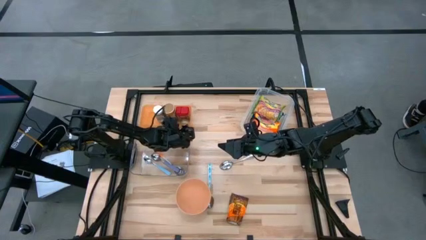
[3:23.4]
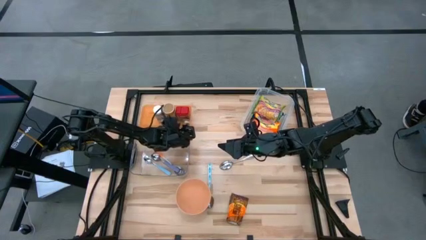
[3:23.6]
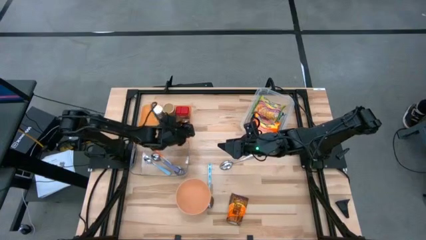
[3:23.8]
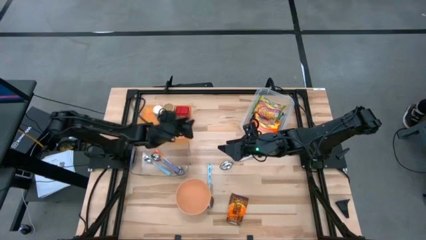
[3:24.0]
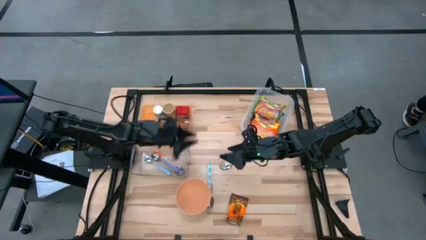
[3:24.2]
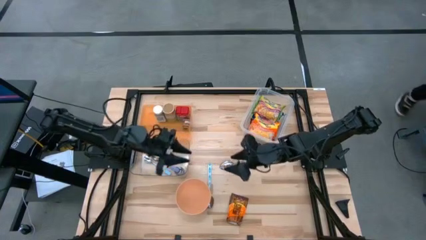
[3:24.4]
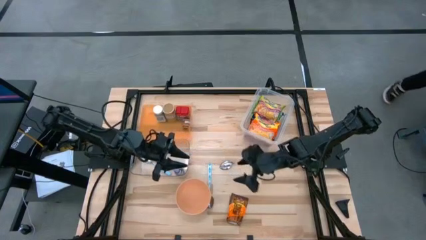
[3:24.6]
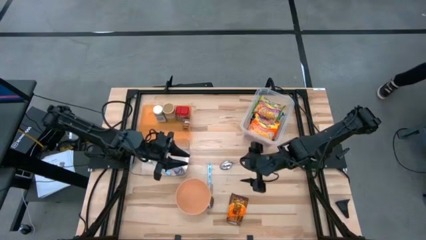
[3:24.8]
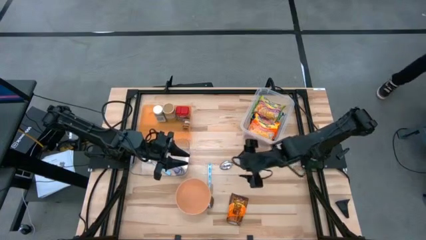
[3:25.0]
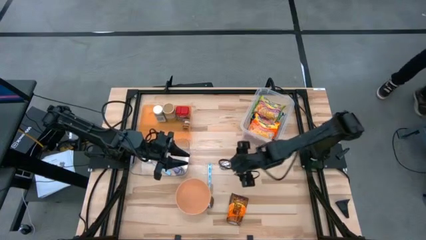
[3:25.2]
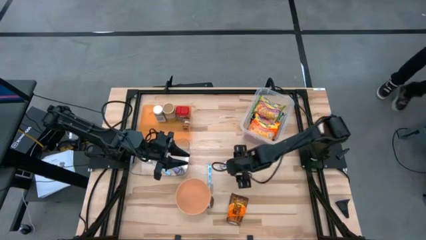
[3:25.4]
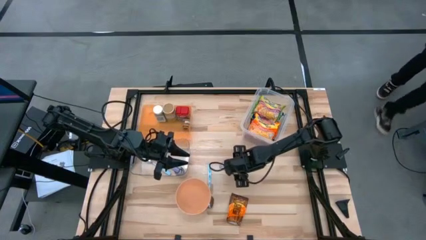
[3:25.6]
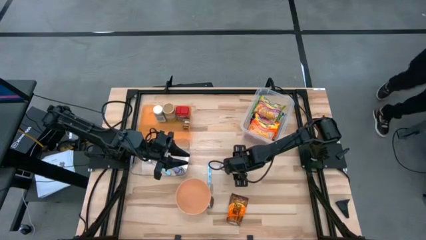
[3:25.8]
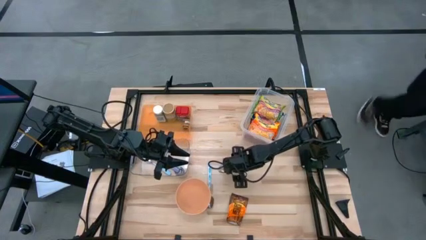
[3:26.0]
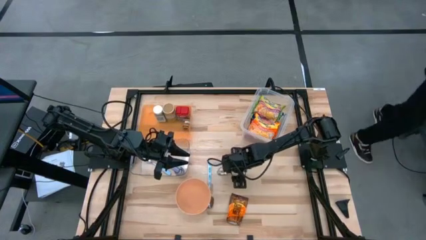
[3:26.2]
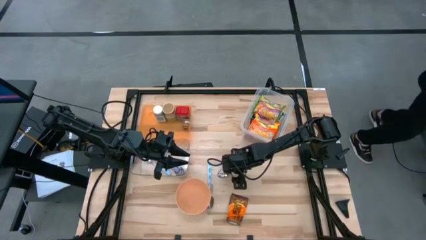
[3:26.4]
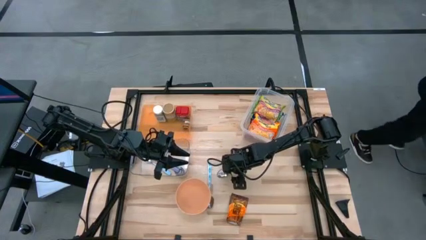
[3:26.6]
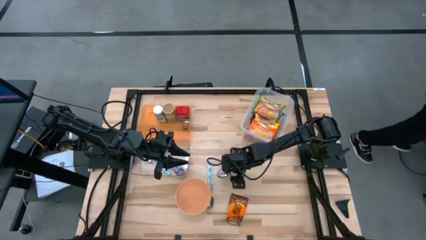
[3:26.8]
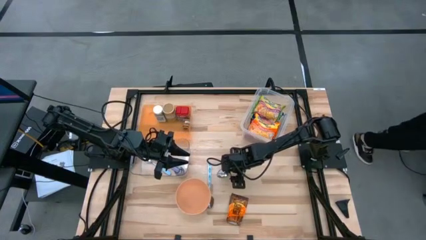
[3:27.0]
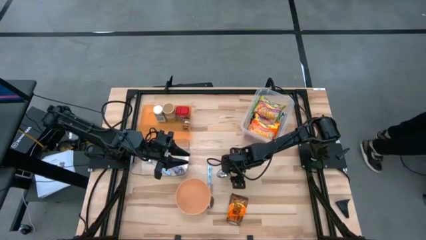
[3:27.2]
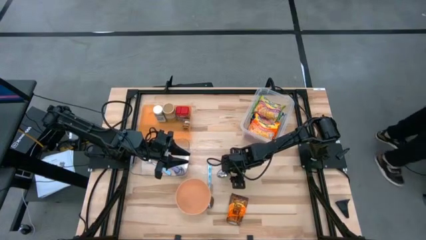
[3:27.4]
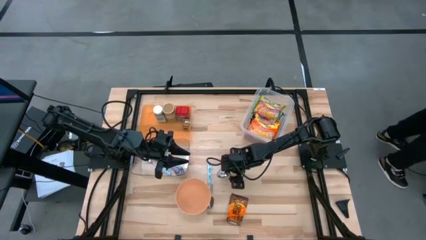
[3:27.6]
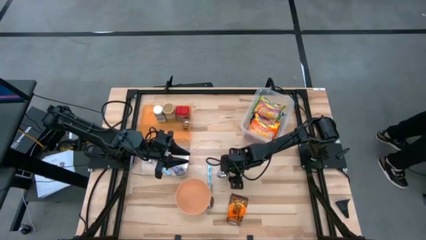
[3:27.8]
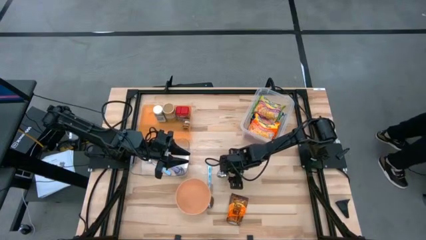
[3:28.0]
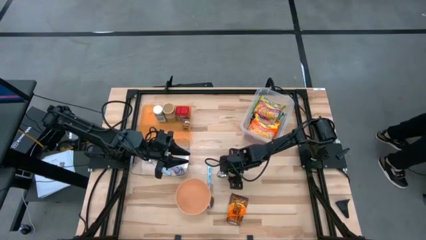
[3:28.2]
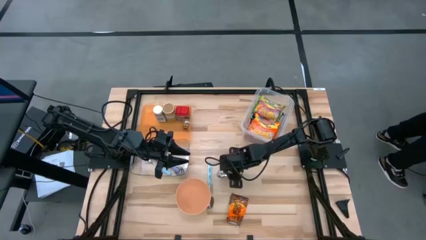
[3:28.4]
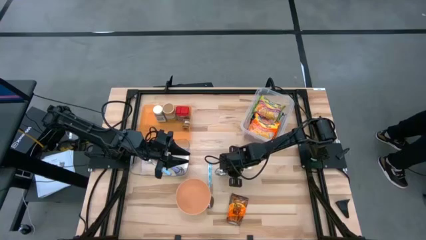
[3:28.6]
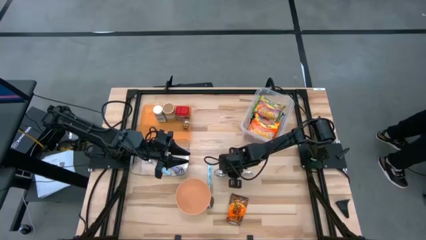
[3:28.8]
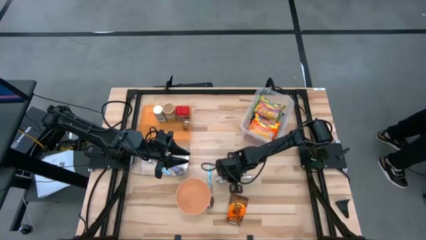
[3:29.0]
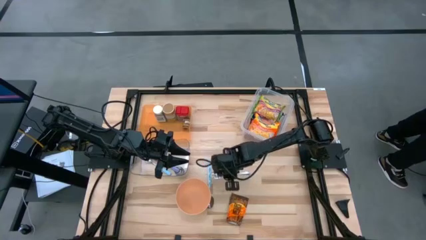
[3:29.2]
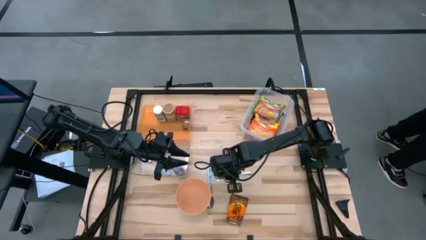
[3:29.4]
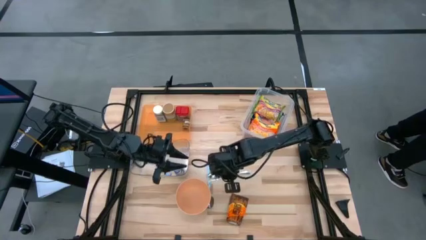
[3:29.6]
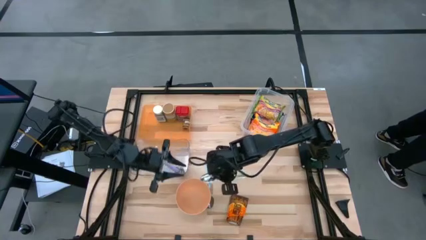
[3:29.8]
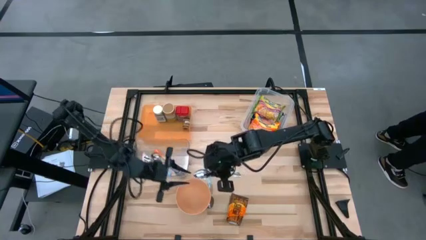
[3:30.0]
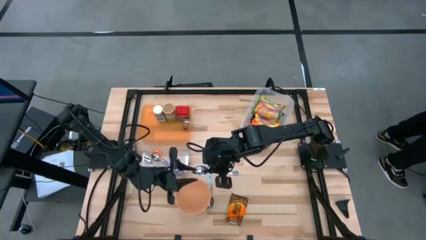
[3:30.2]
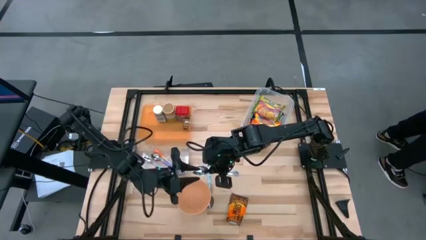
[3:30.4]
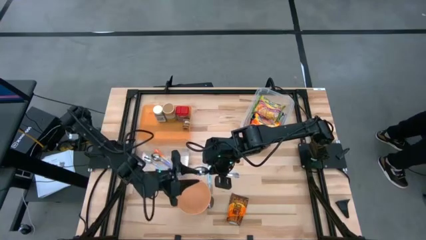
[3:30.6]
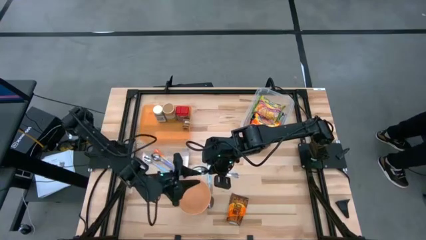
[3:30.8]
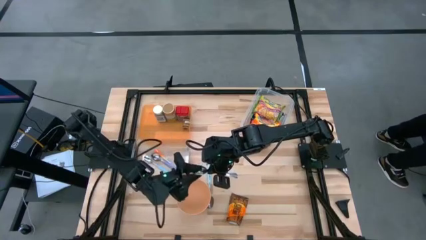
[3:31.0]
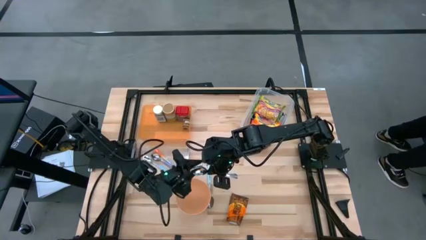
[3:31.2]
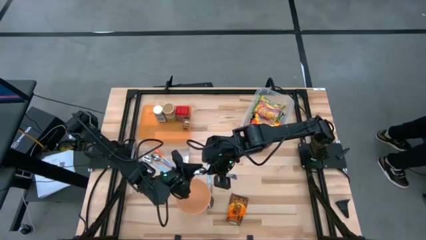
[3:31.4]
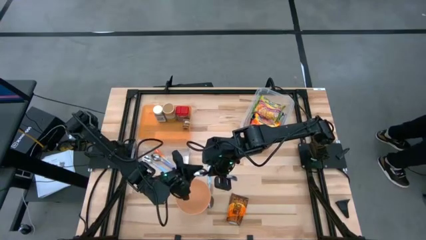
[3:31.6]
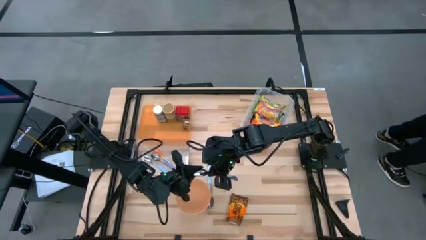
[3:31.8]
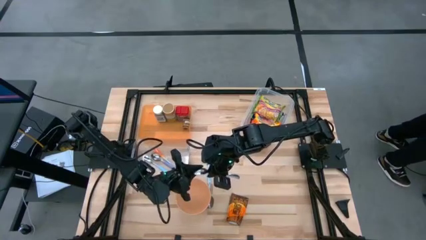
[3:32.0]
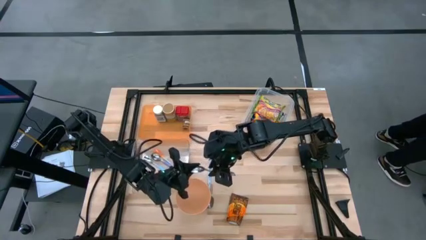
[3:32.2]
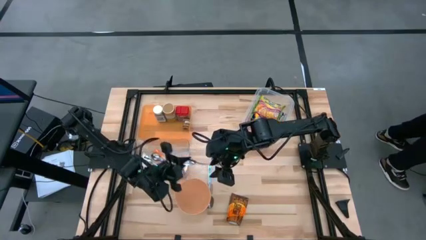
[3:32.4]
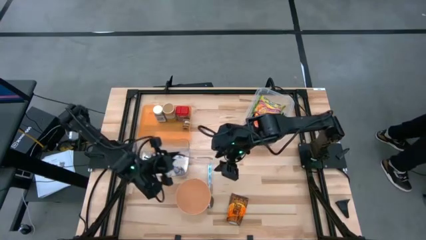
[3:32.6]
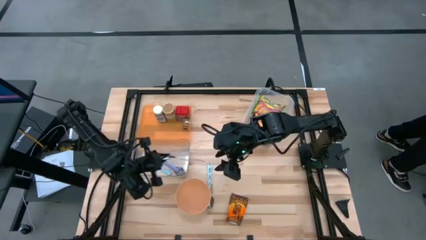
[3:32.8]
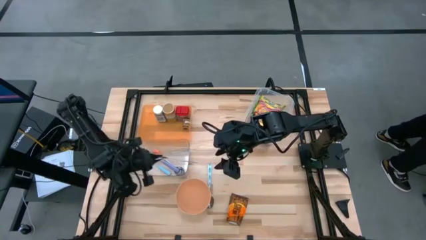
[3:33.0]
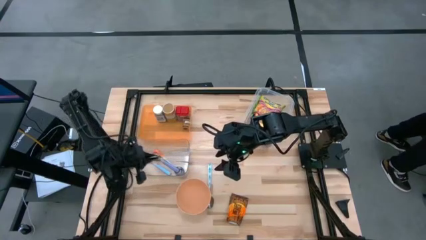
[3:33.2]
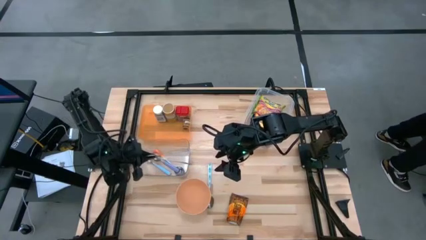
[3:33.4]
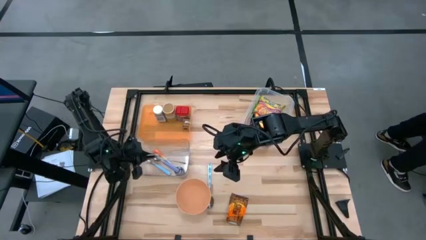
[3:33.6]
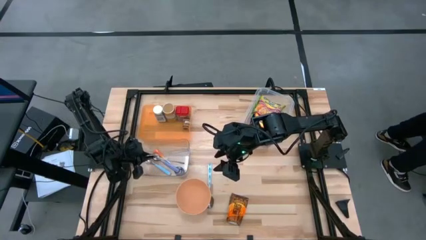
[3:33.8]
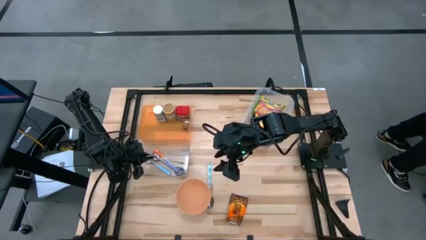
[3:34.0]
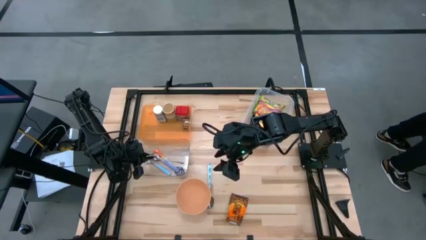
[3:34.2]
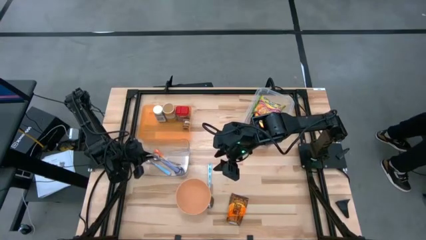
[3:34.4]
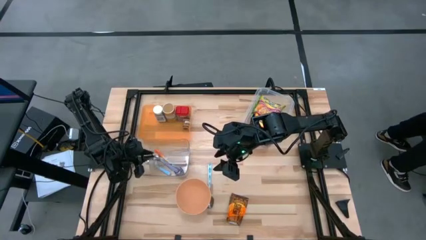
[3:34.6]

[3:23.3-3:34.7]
Task: Pick & Place Food Item
Put the silver spoon into the bottom transparent bin

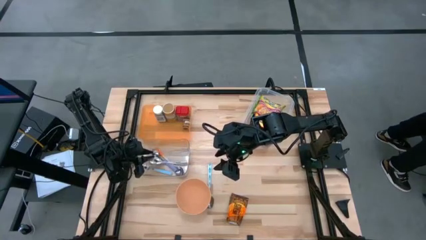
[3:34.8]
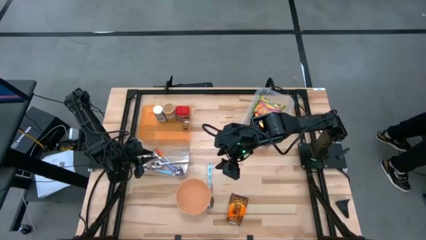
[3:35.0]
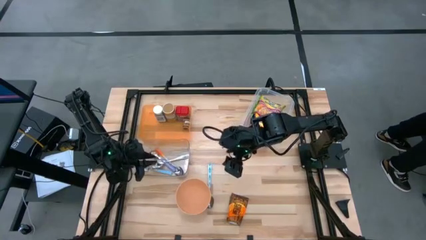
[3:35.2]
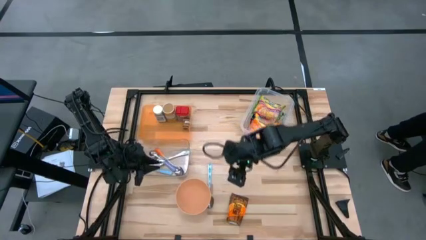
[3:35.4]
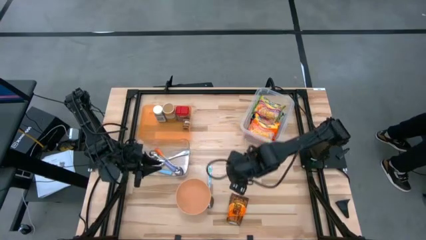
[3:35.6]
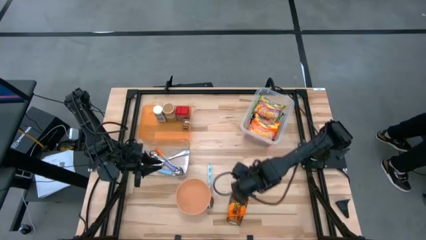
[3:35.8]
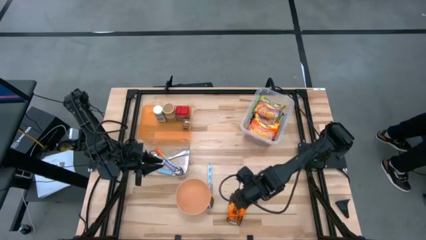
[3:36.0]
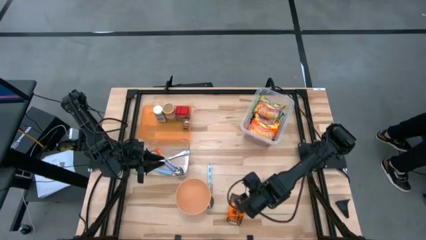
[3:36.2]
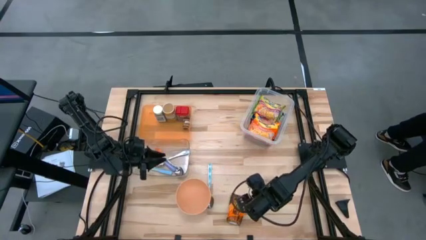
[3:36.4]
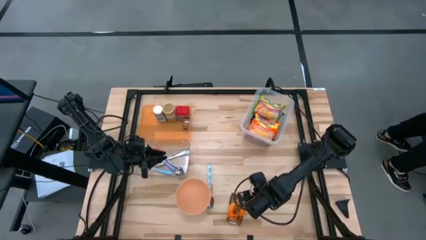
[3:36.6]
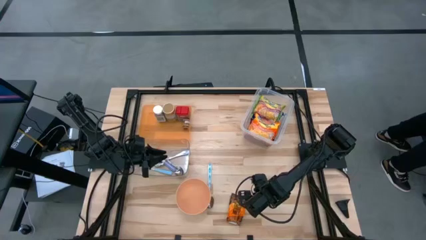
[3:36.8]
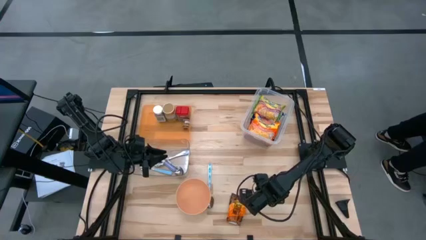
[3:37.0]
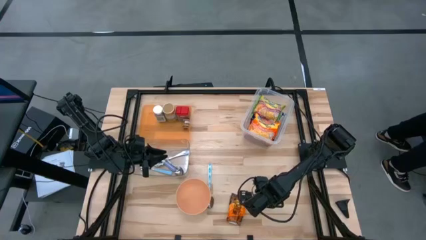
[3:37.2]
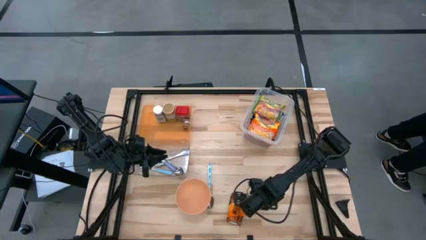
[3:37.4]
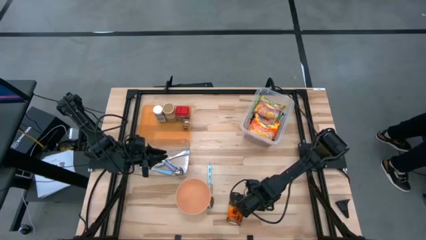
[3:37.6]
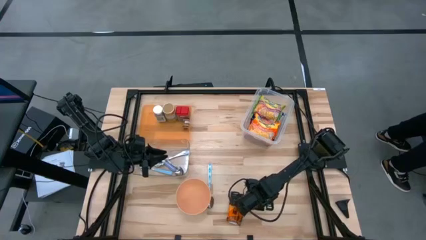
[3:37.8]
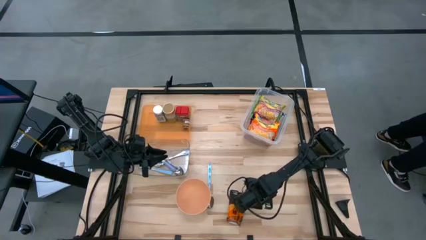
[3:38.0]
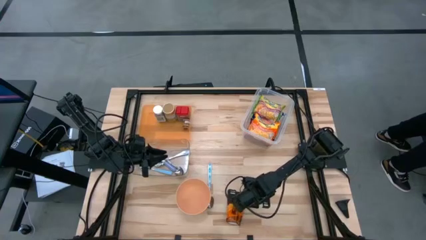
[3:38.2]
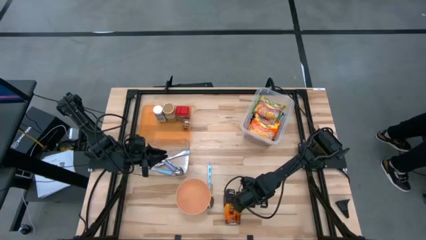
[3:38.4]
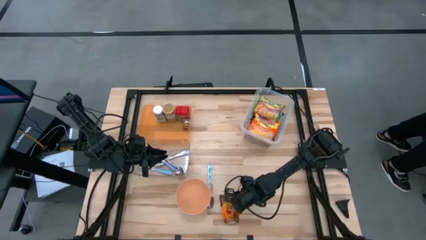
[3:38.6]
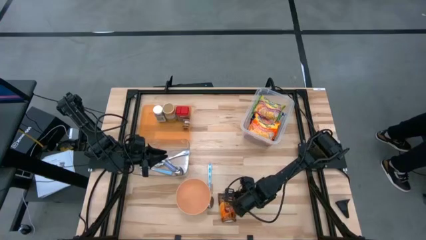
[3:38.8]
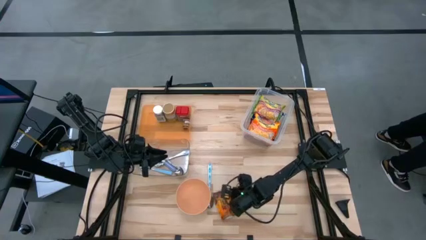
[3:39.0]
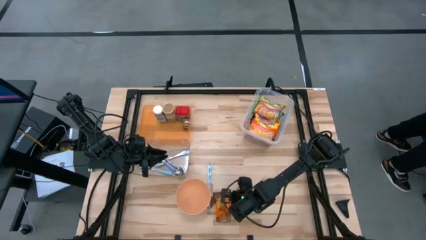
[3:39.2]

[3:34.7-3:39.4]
Put the orange seasoning bag into the orange bin
